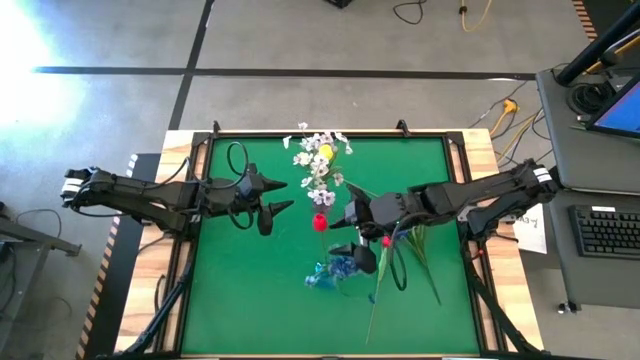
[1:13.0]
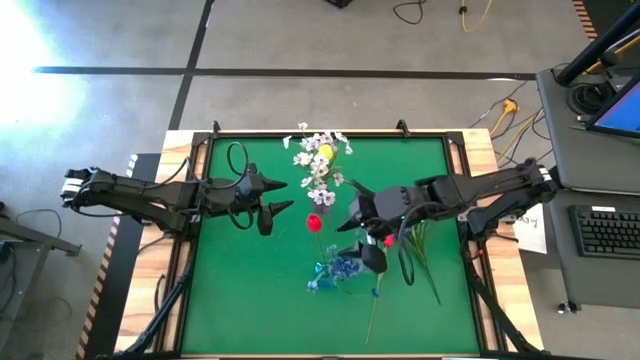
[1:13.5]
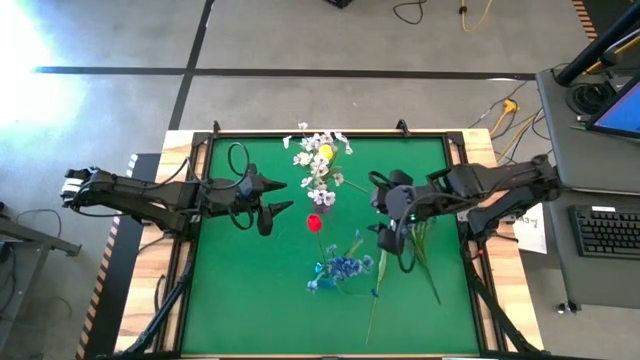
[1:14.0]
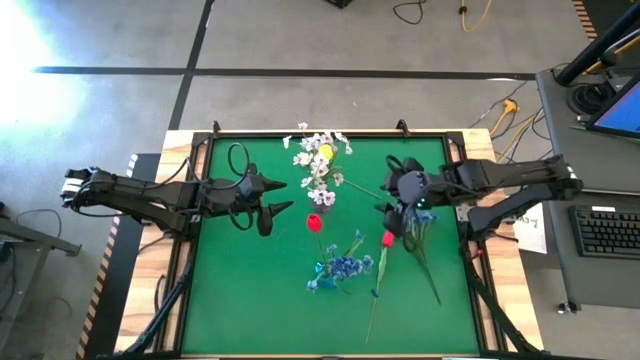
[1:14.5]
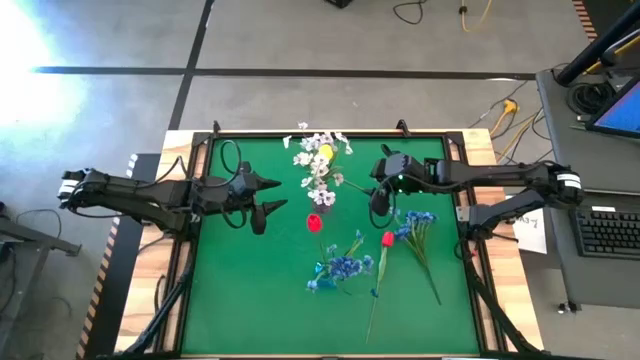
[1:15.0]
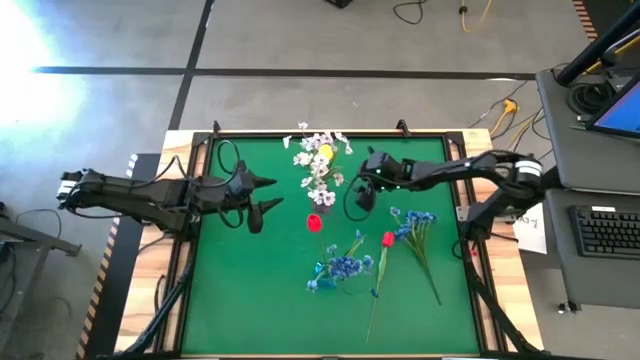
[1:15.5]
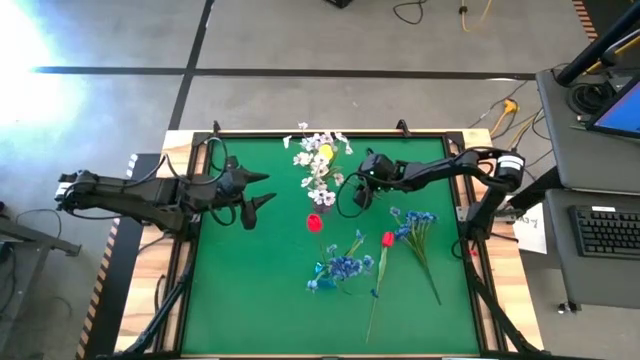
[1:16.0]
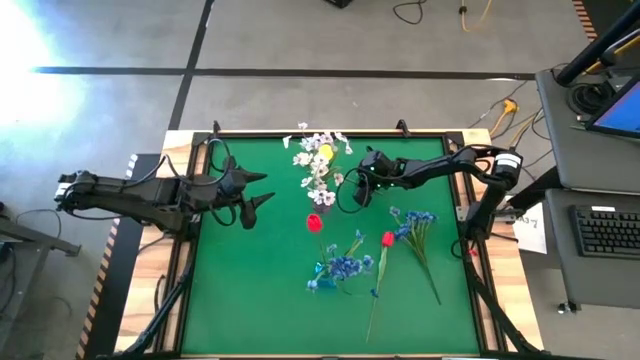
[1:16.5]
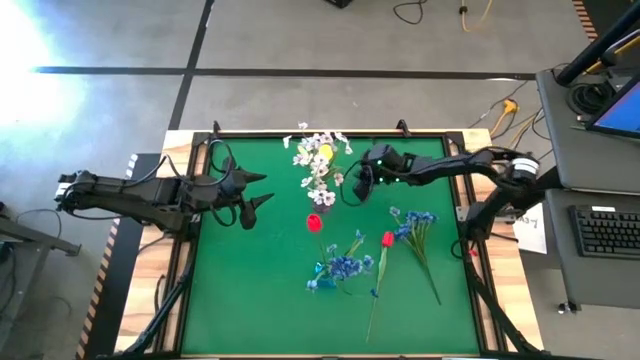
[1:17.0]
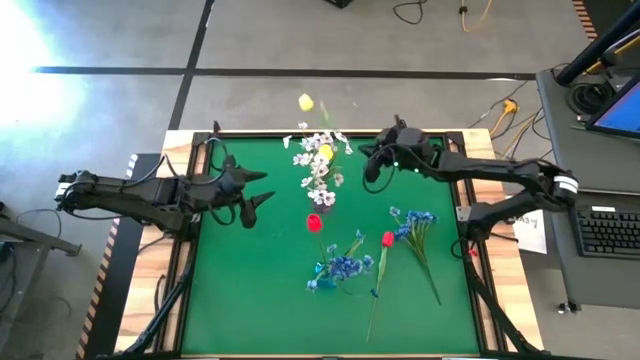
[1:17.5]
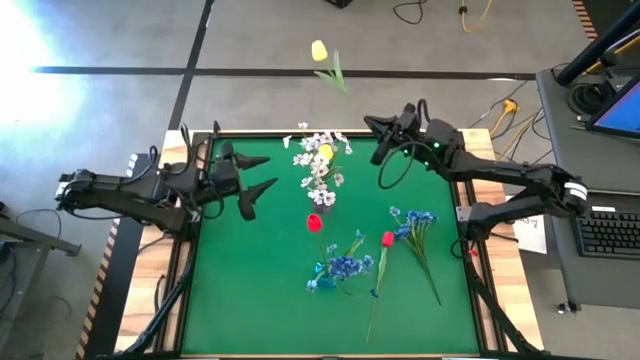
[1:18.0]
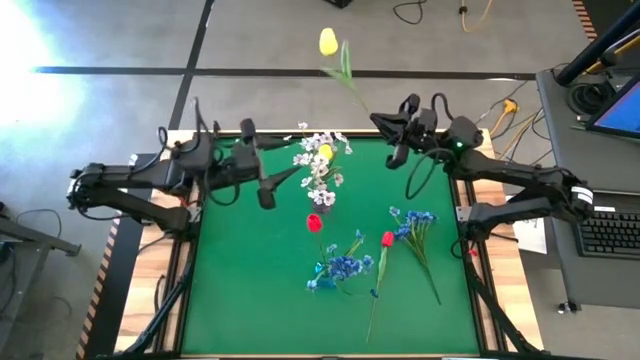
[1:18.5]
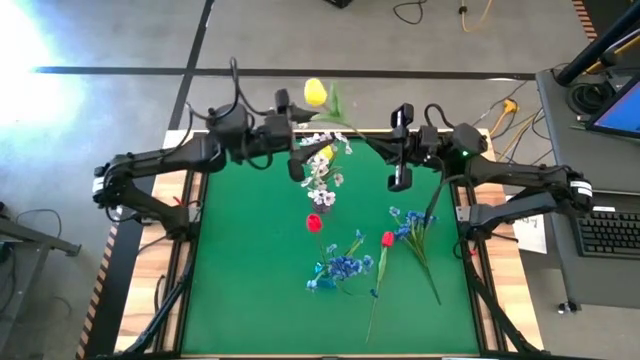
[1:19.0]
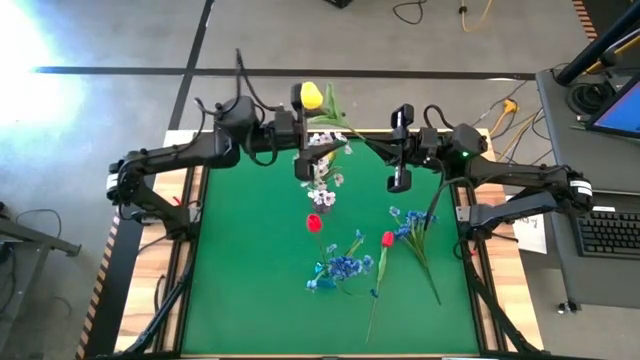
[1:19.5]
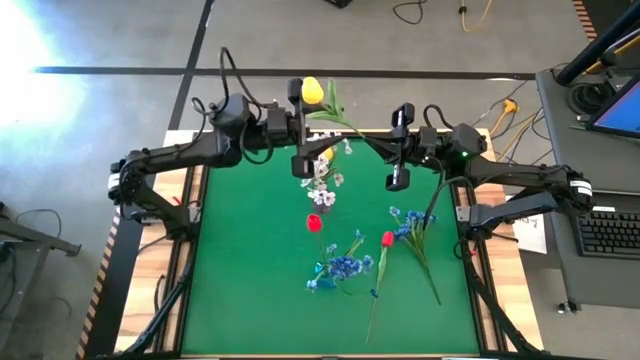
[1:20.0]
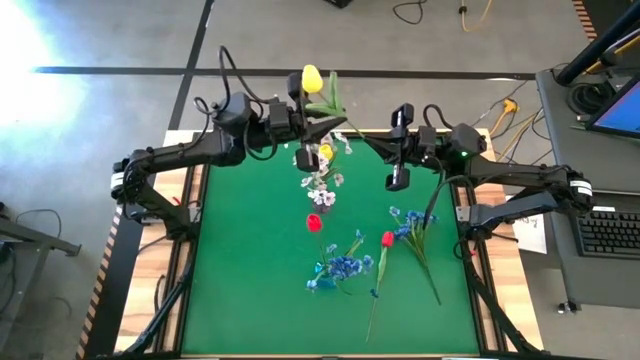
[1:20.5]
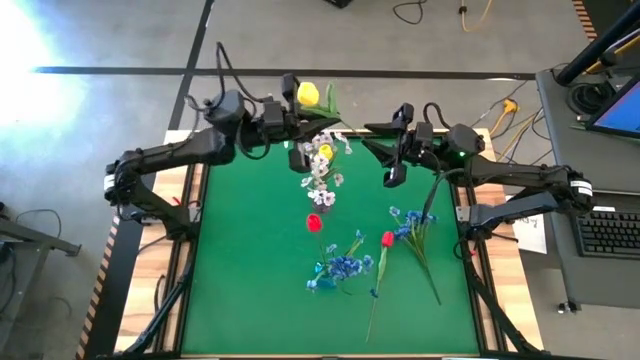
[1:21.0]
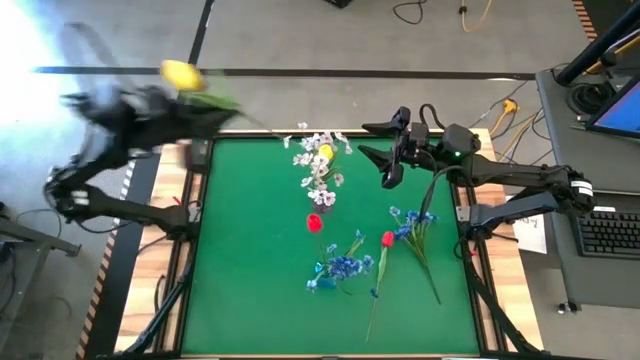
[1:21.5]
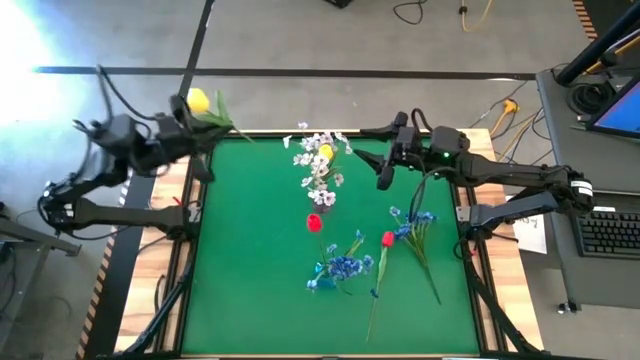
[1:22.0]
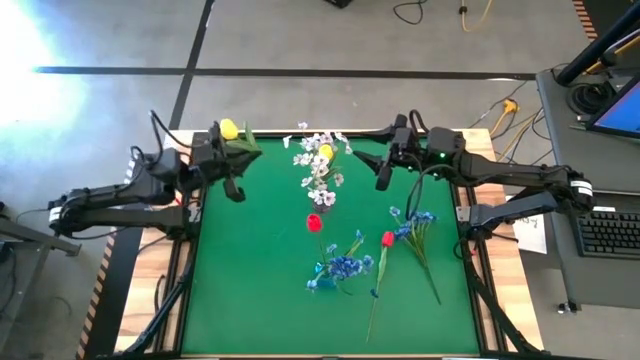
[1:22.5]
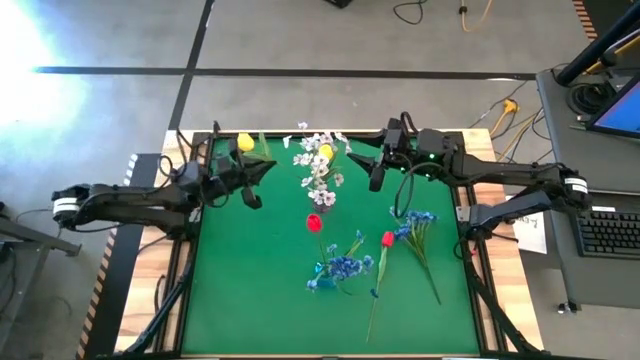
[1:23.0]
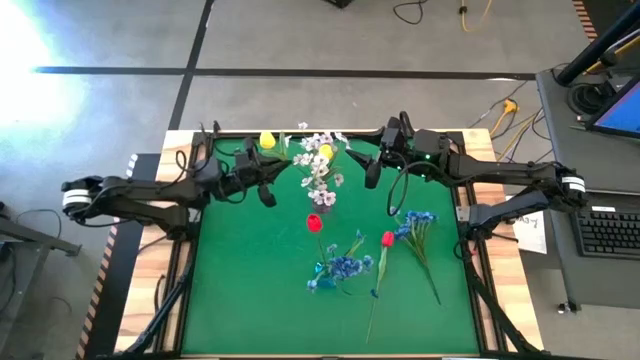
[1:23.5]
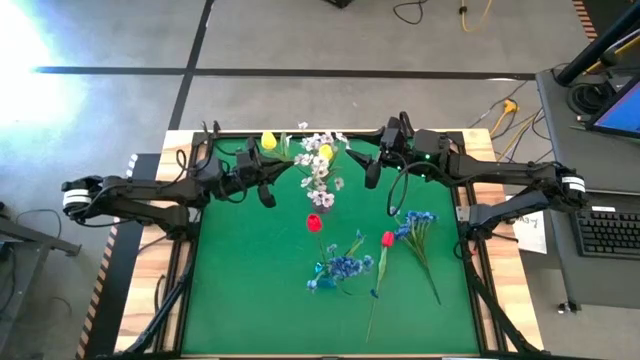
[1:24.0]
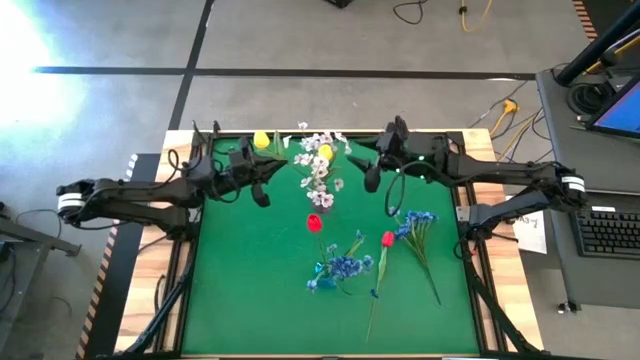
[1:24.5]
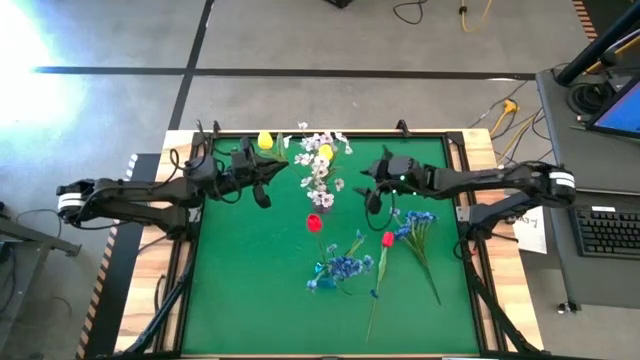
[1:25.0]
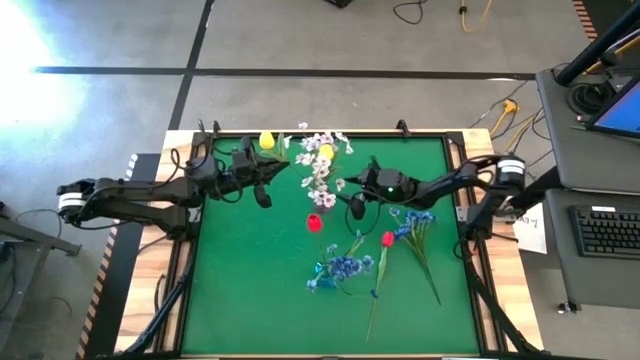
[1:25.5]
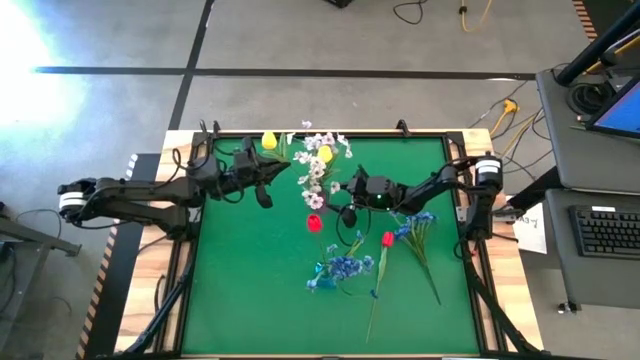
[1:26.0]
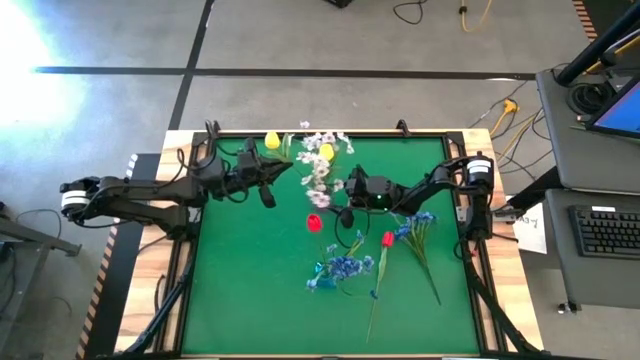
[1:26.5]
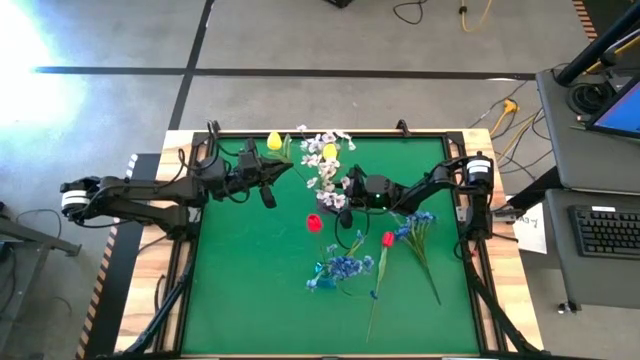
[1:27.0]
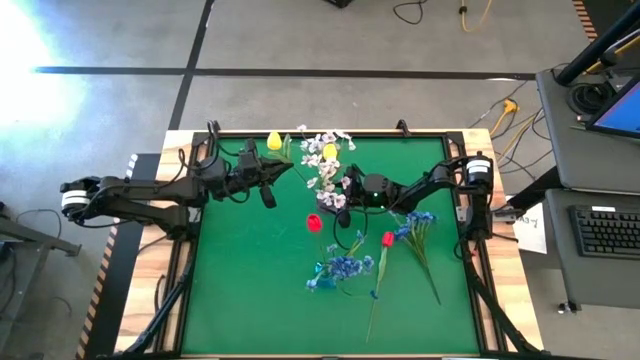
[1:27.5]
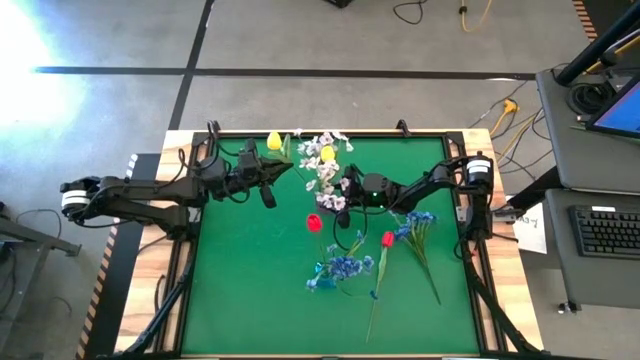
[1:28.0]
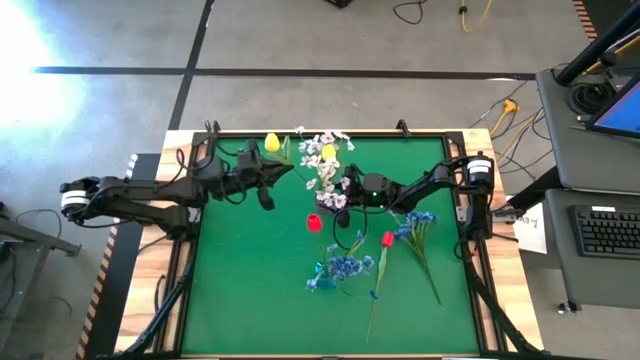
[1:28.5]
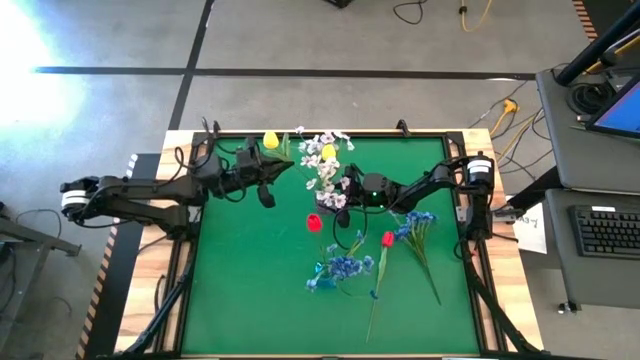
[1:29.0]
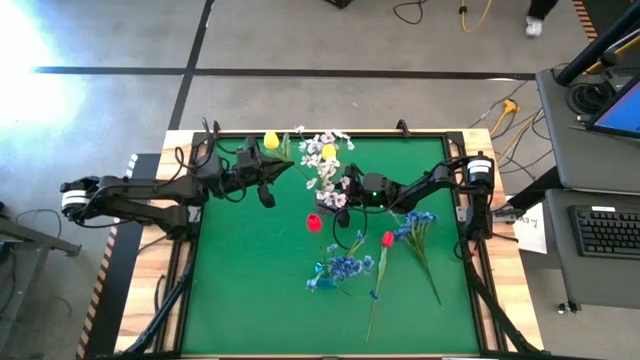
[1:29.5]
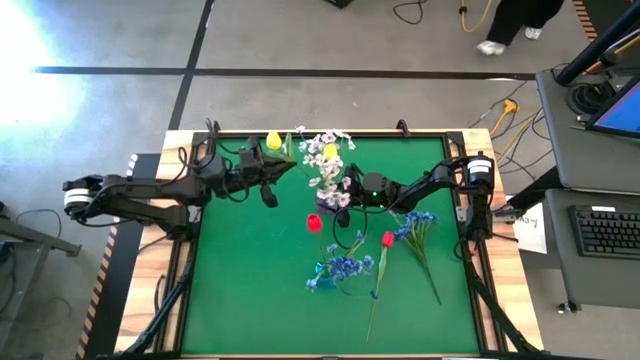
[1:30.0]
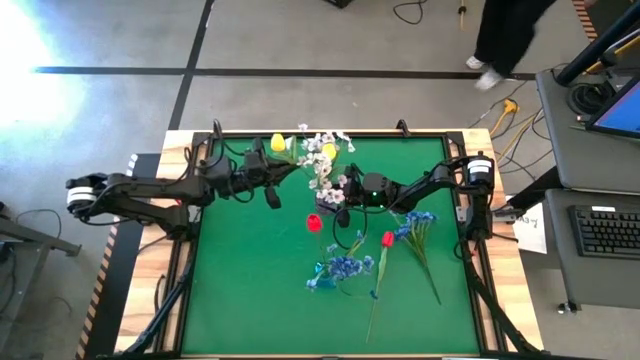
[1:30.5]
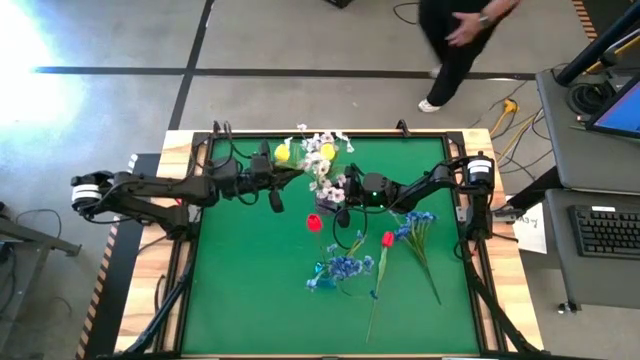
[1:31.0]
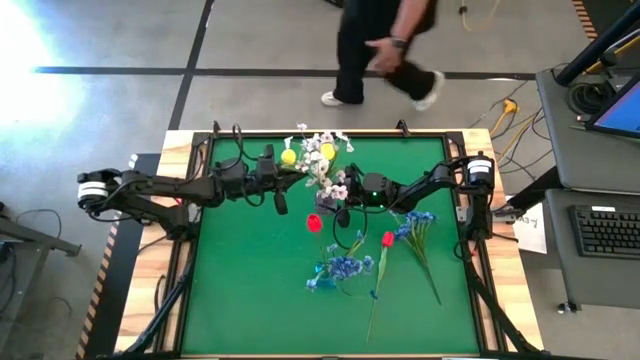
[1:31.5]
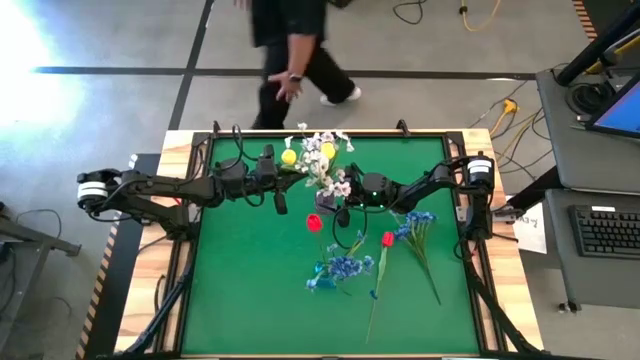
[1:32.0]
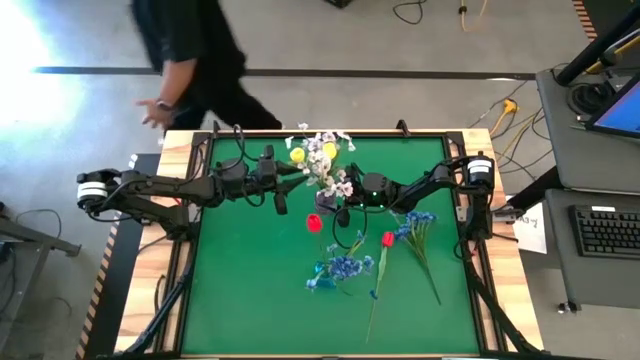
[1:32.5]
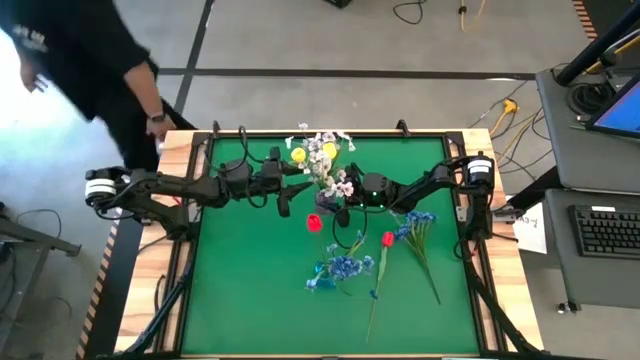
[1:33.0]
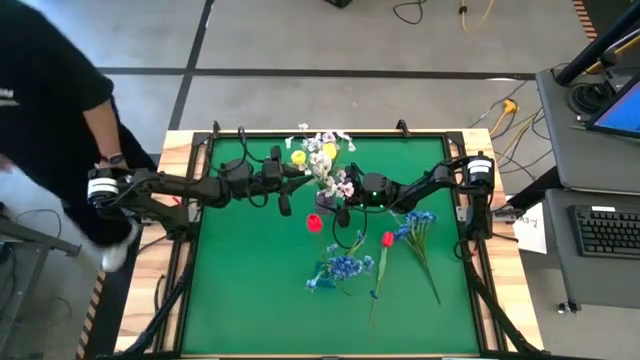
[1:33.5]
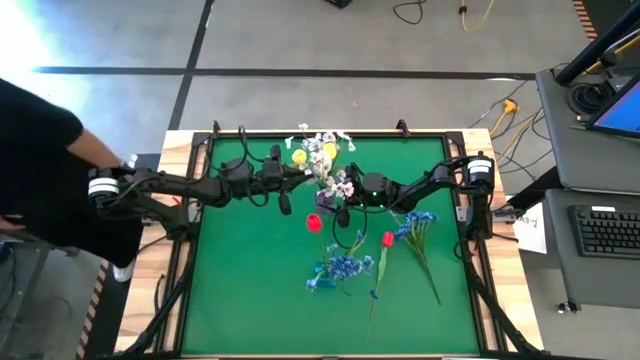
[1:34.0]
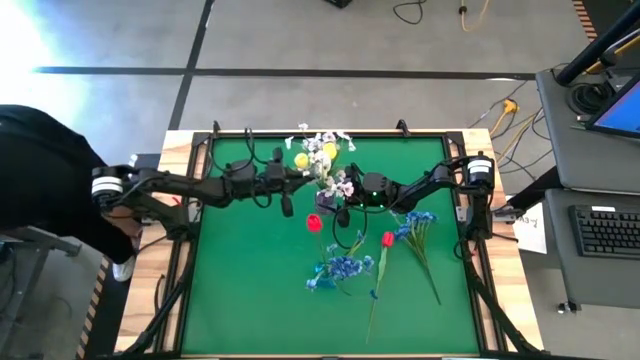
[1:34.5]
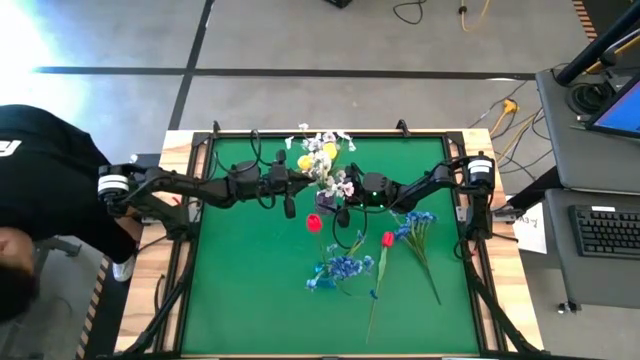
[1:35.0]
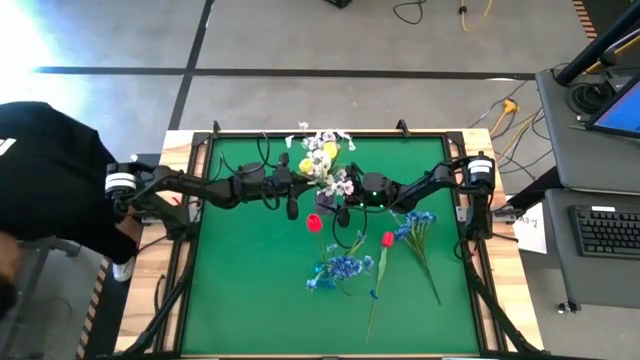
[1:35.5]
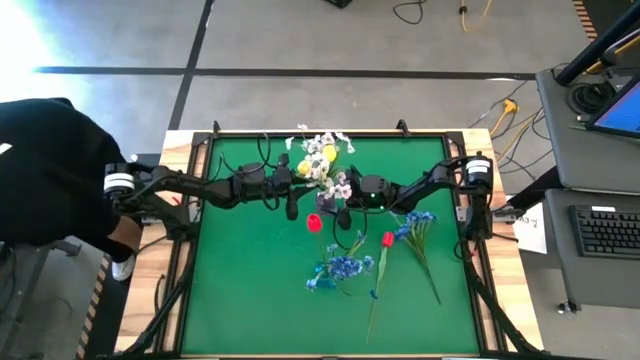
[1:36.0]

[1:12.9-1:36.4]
Task: Sort flowers into vase by color
Put the yellow flower into the violet vase
